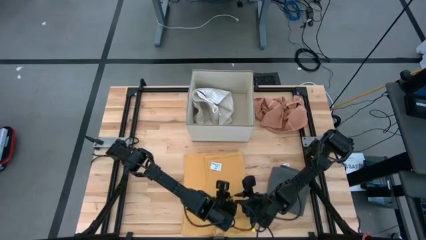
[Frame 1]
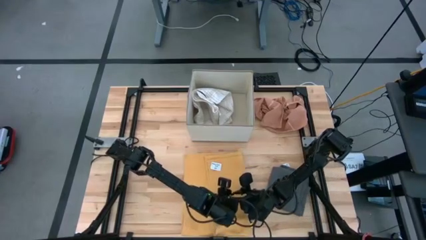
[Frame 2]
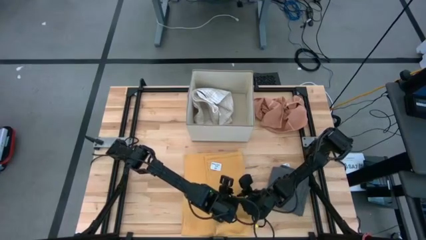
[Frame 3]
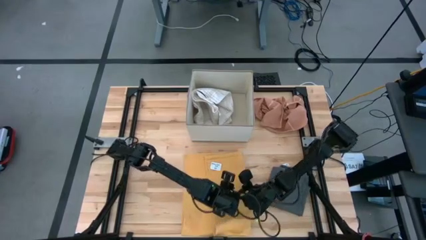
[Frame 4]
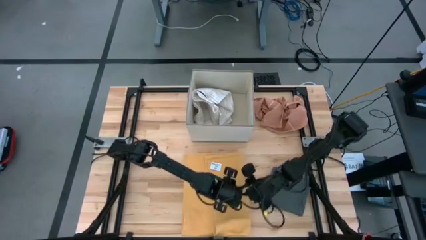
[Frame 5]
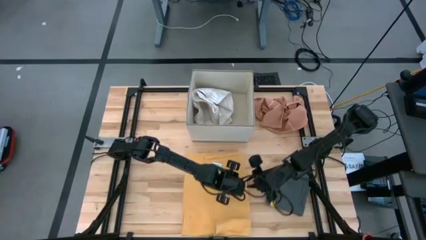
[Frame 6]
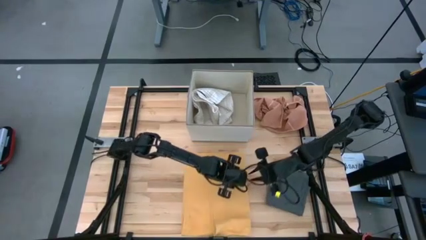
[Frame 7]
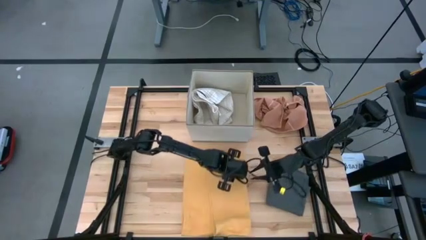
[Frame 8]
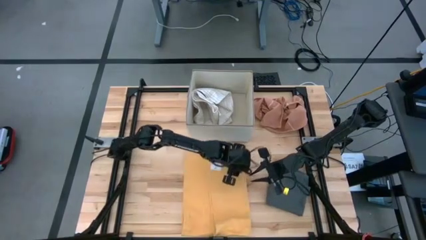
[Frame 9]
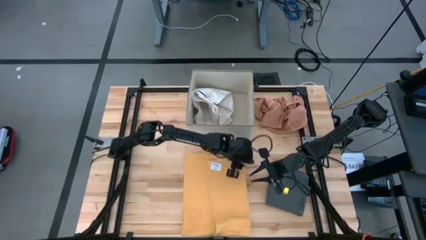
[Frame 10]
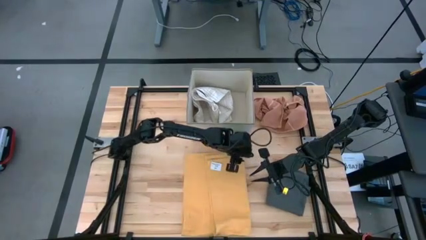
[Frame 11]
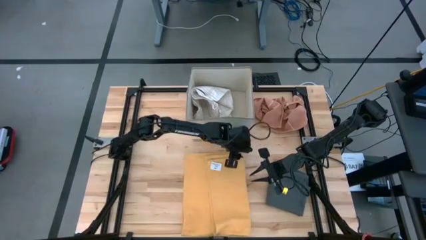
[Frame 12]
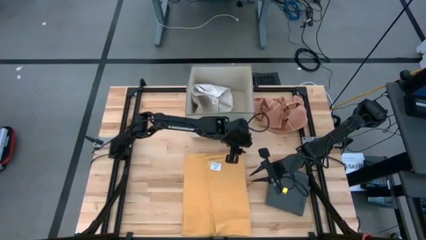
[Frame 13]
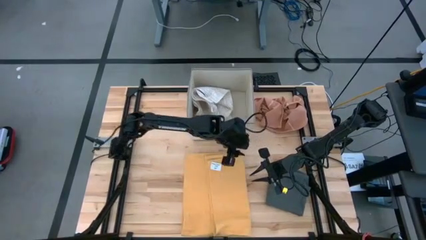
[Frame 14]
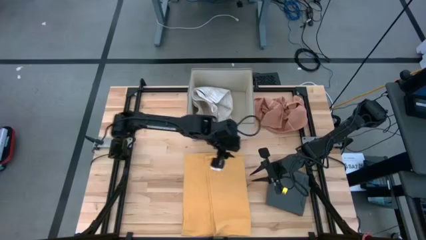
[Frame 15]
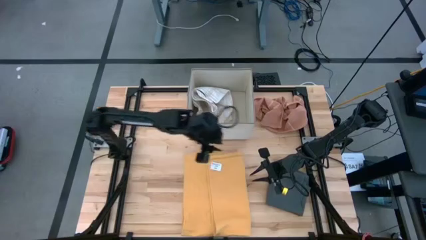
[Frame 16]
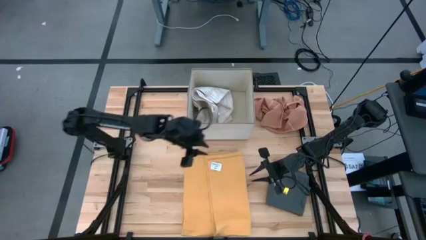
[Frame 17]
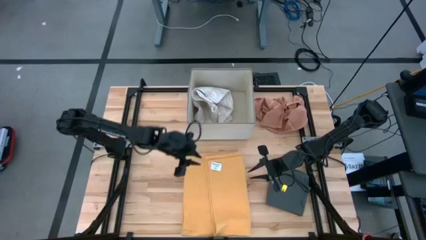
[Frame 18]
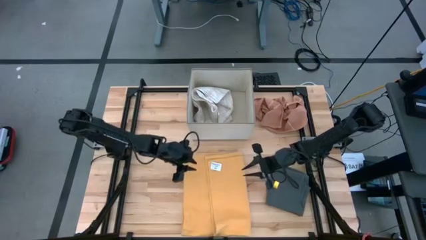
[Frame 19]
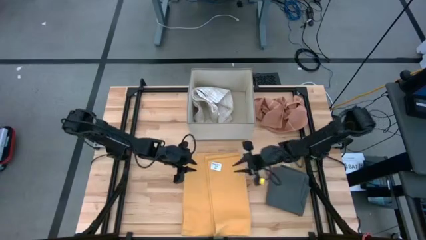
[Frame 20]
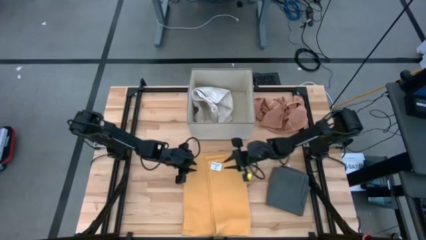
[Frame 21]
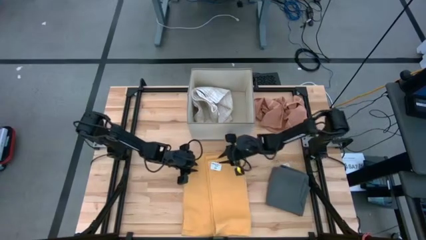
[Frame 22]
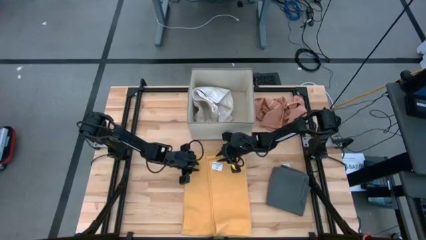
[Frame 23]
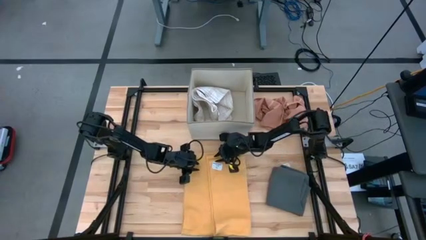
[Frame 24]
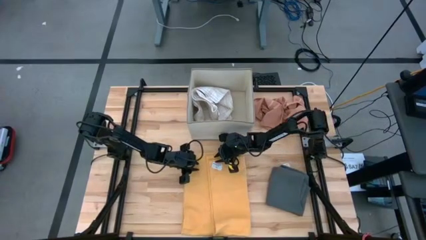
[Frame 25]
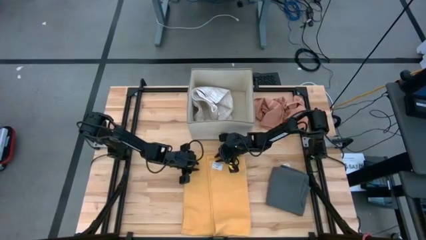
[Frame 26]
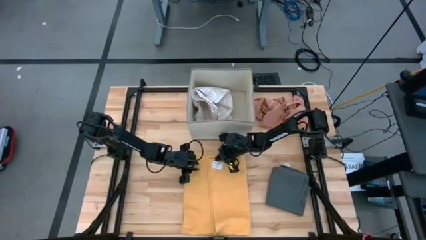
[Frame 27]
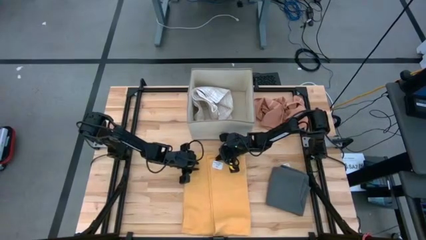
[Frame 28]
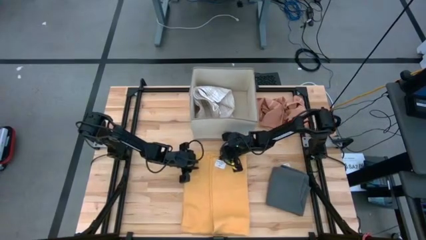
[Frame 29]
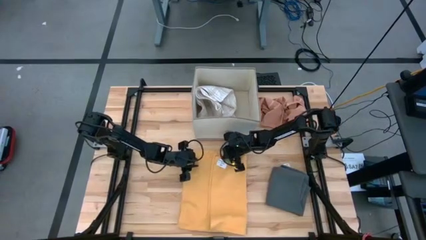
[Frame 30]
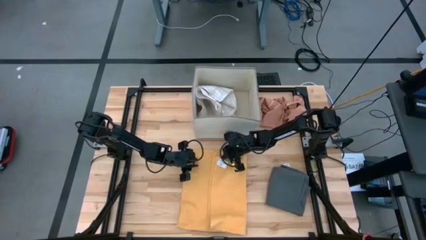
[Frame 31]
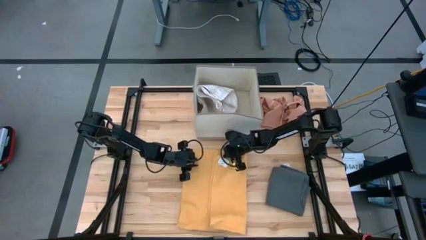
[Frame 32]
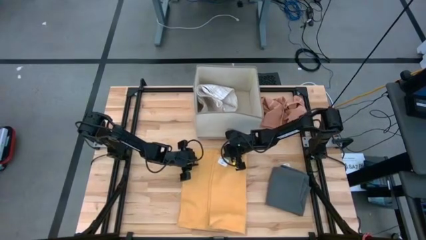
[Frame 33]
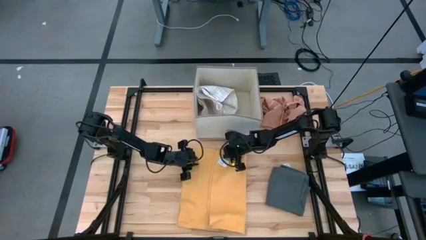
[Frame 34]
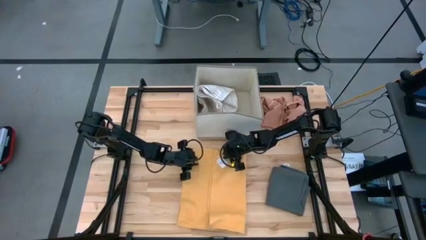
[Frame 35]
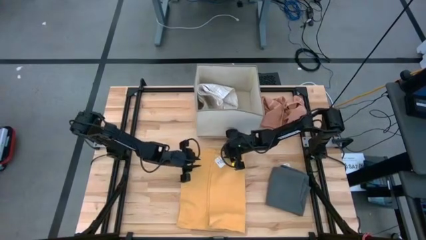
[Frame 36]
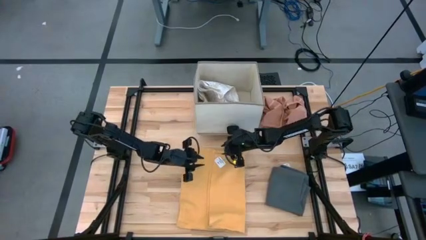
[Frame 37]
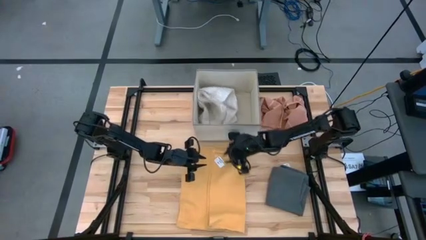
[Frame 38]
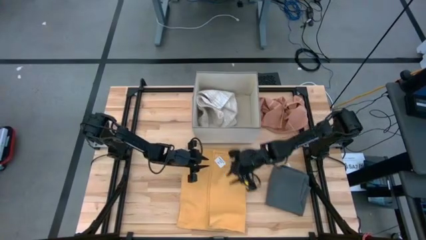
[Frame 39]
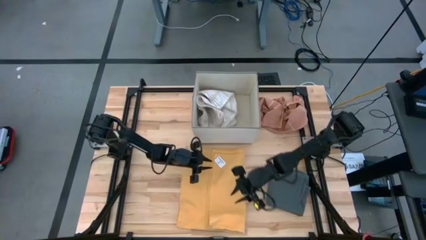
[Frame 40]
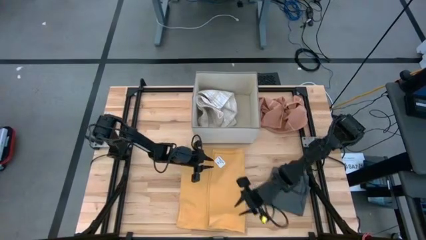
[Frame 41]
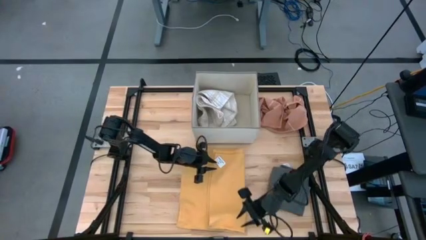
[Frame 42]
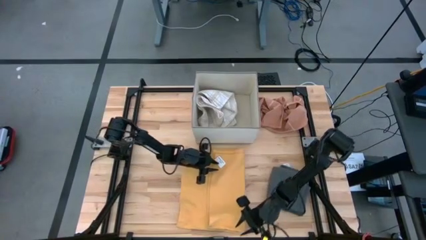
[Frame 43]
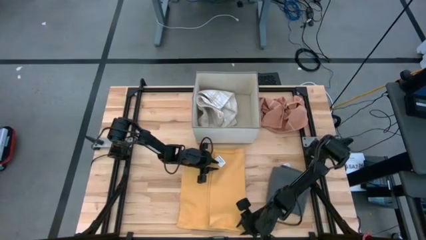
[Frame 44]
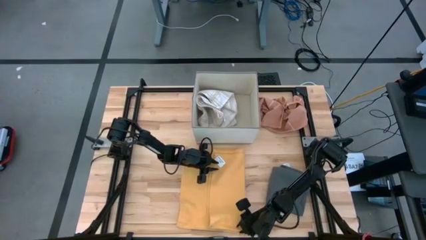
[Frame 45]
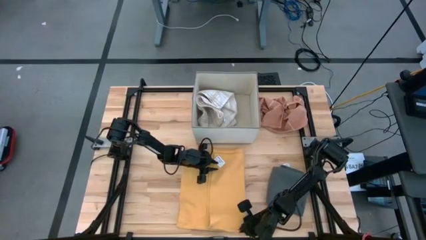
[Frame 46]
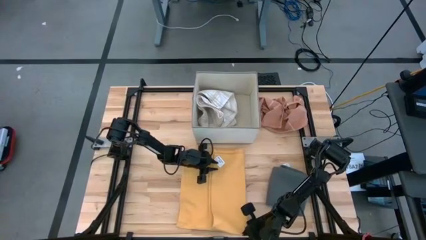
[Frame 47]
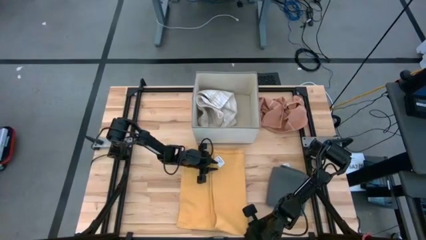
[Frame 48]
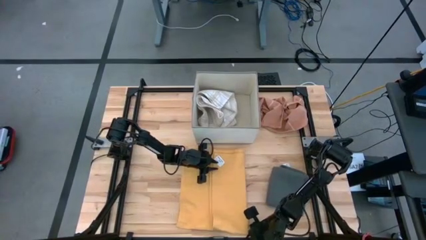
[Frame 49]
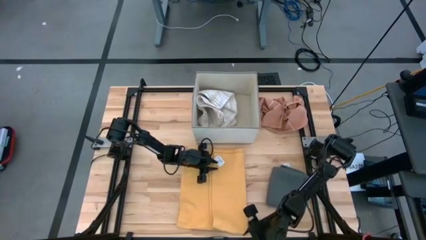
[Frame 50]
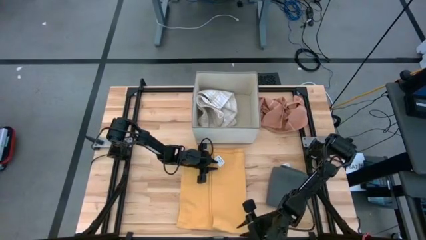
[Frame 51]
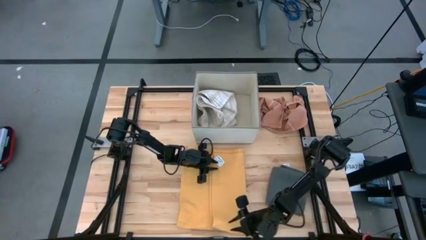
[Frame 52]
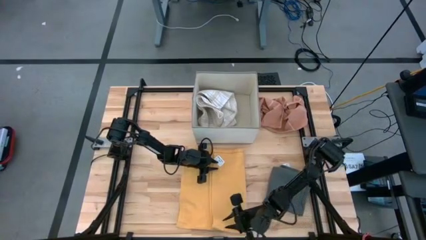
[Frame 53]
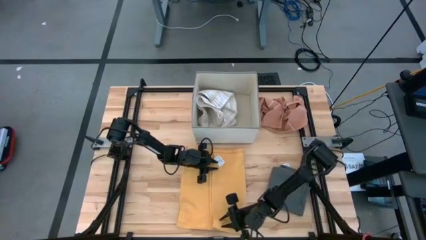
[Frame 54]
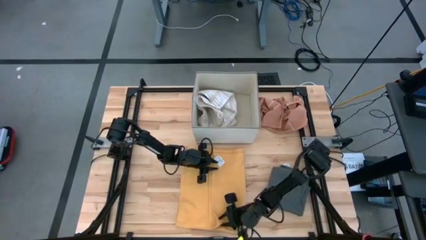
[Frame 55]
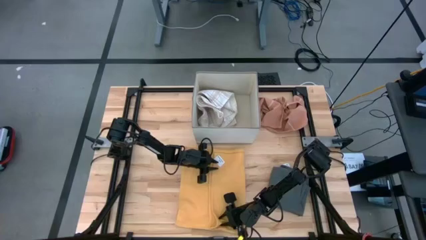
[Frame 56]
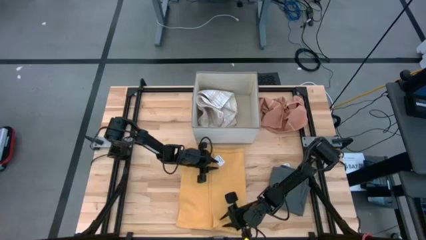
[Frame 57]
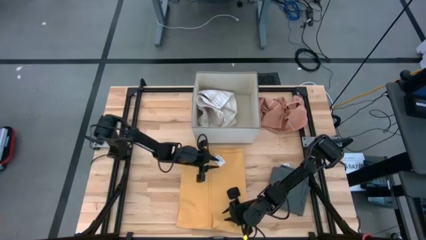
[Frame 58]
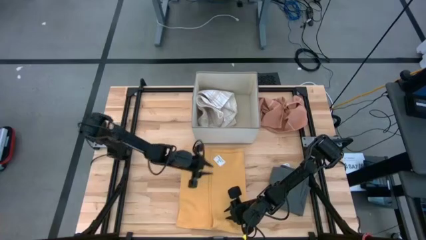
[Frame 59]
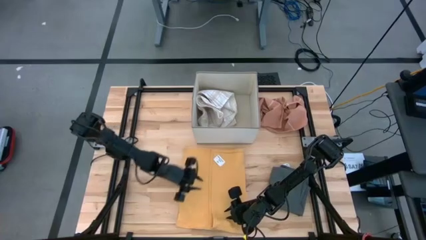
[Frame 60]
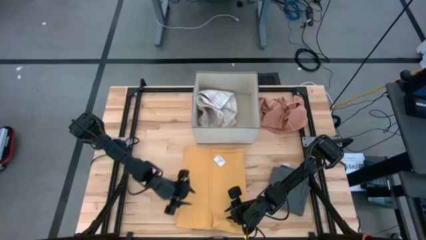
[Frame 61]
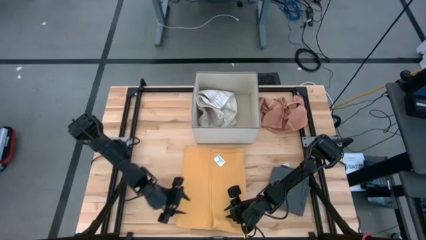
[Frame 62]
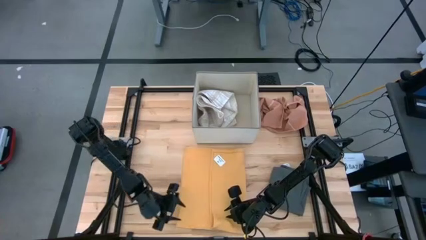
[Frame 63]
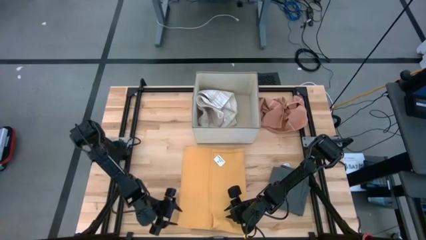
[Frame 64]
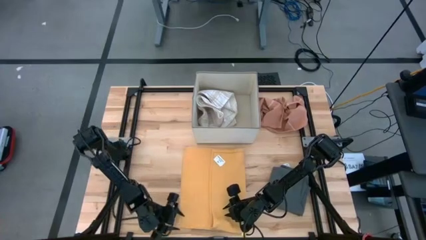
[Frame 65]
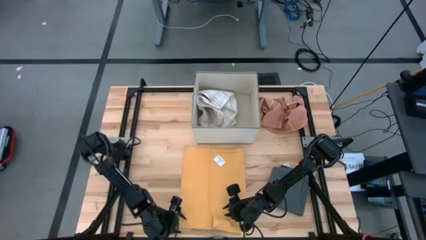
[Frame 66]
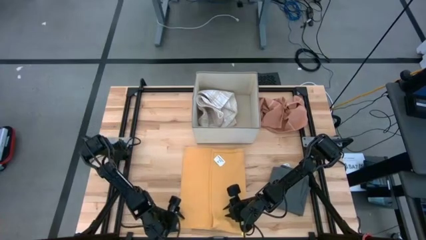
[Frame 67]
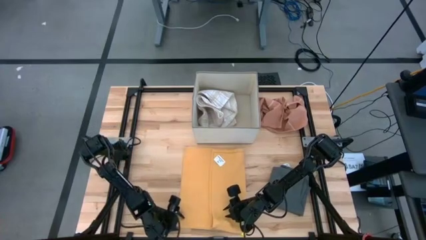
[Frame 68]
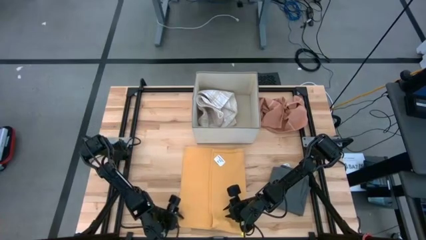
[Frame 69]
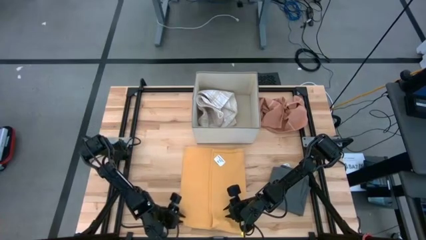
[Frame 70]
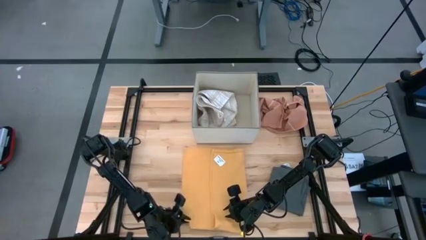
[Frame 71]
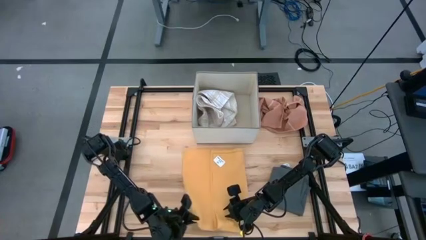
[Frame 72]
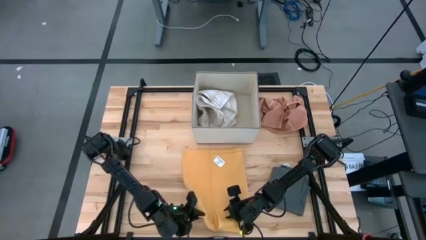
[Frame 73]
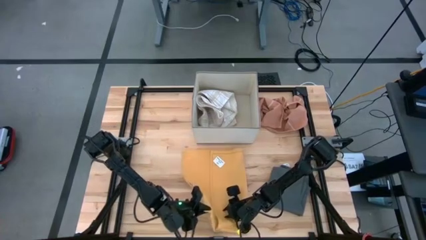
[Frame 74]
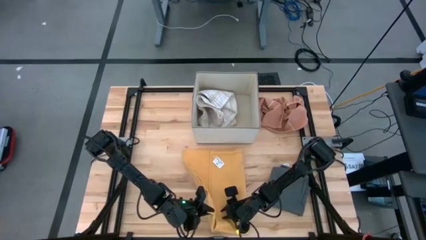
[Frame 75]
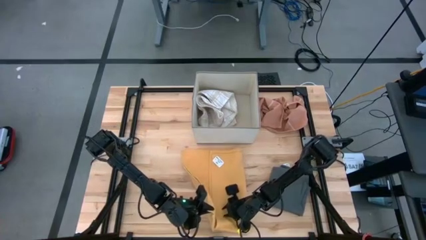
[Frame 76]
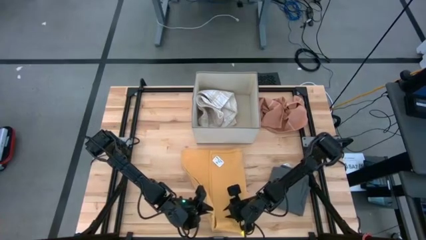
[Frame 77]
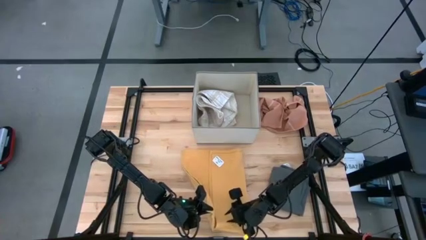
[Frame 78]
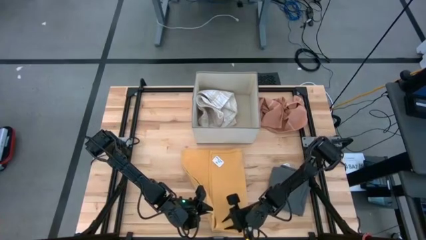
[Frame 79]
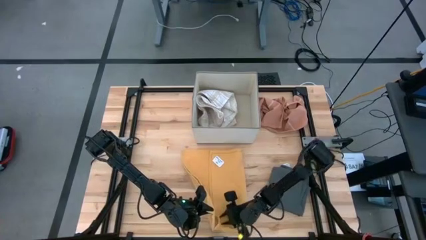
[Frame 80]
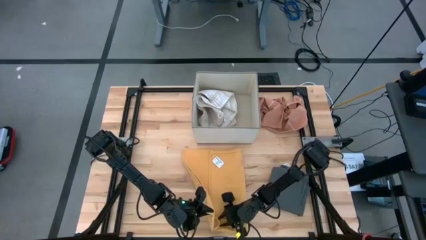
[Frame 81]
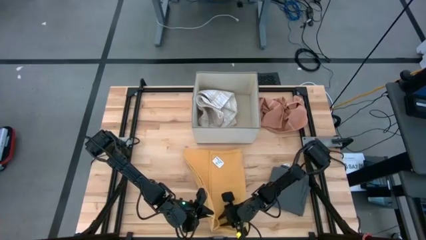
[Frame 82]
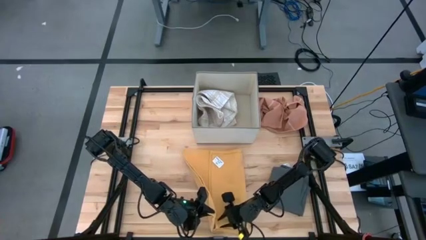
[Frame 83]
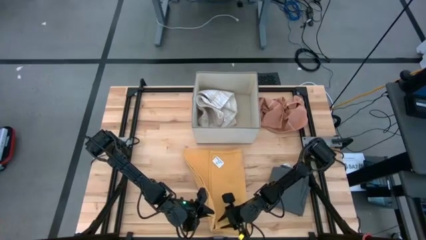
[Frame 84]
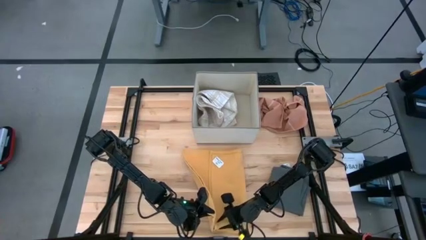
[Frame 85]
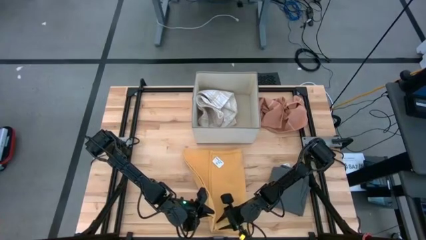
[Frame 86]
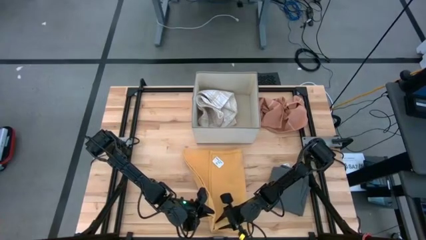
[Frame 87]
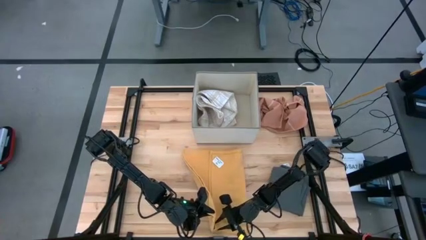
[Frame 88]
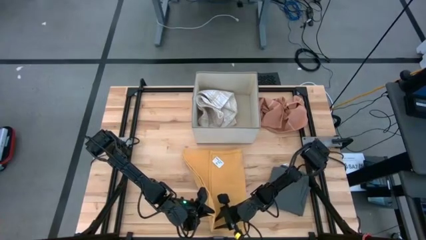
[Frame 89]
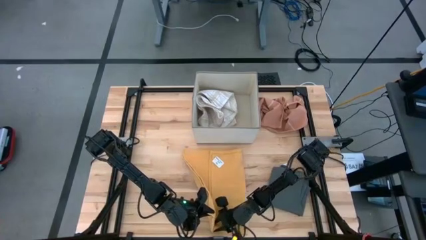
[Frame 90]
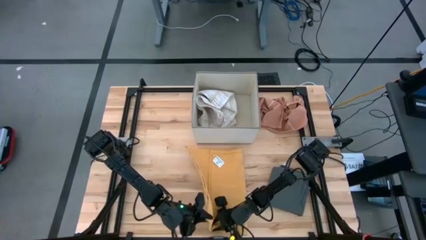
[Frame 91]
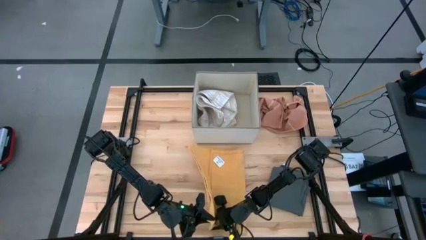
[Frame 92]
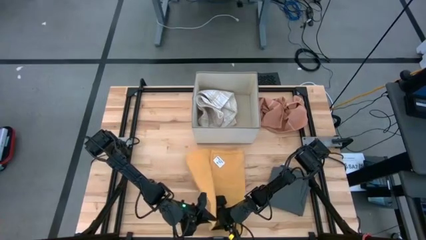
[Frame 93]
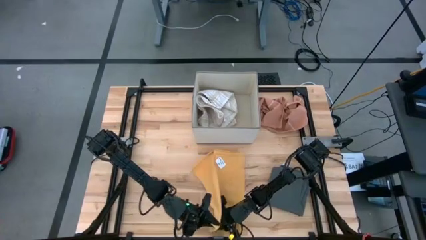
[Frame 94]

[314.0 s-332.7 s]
Task: Fold towel
Fold the yellow towel
